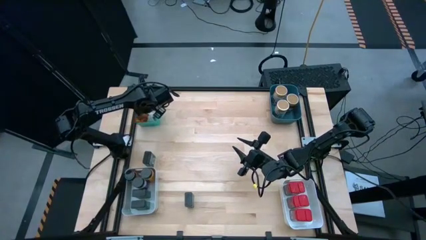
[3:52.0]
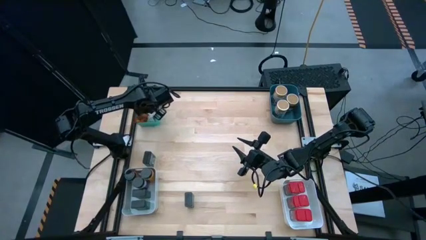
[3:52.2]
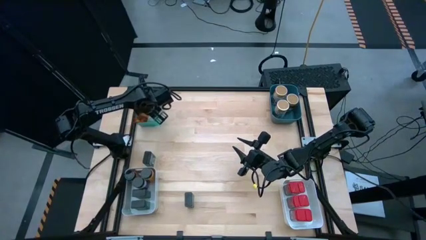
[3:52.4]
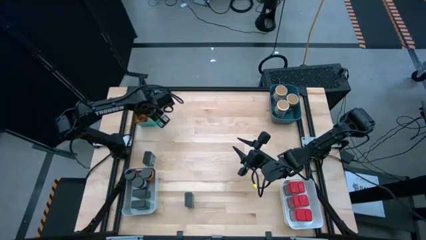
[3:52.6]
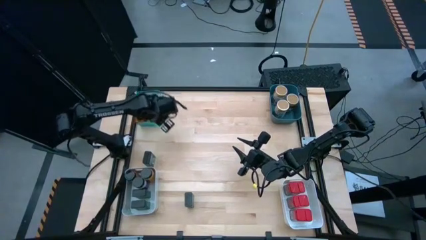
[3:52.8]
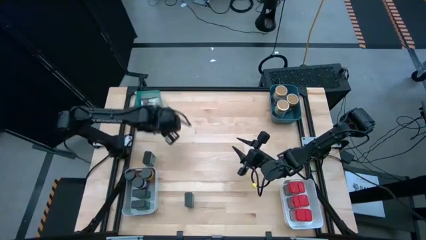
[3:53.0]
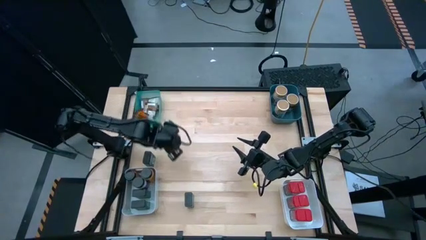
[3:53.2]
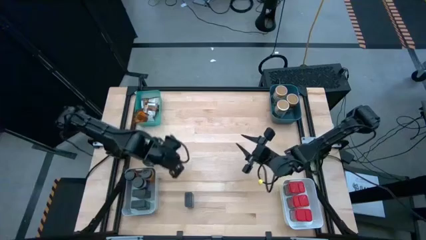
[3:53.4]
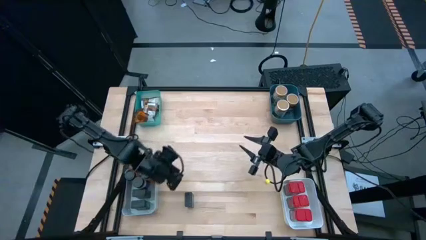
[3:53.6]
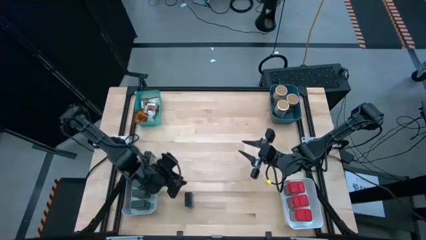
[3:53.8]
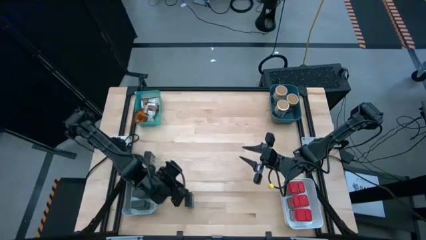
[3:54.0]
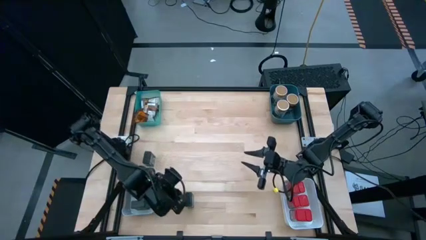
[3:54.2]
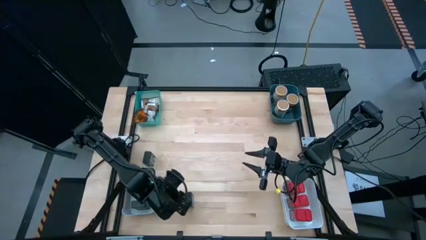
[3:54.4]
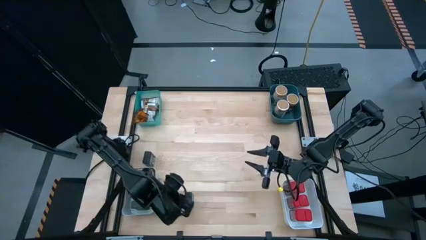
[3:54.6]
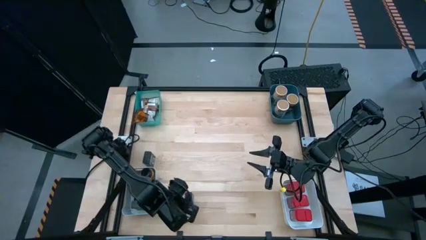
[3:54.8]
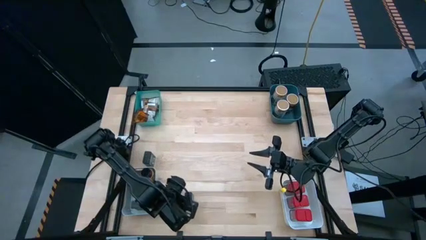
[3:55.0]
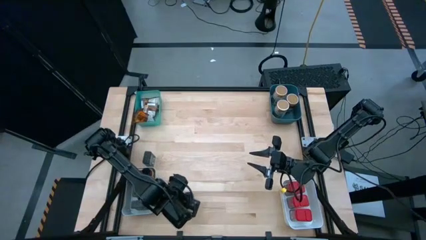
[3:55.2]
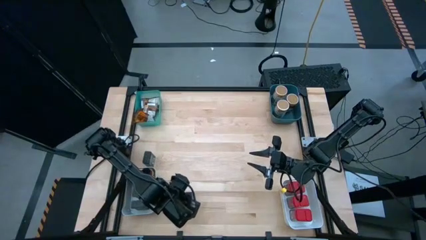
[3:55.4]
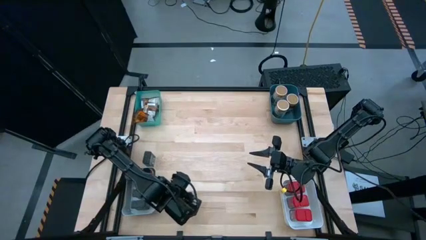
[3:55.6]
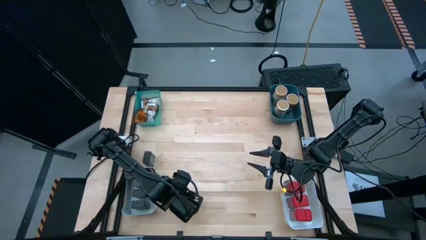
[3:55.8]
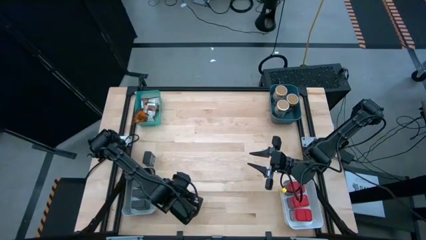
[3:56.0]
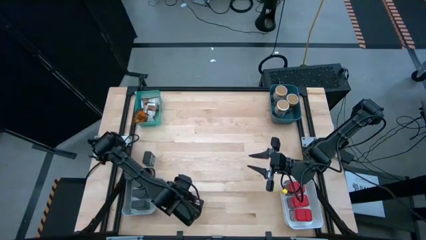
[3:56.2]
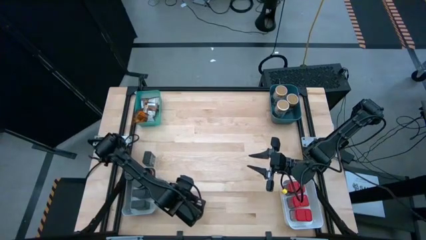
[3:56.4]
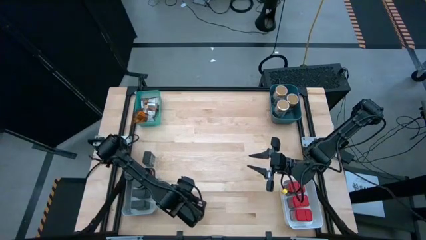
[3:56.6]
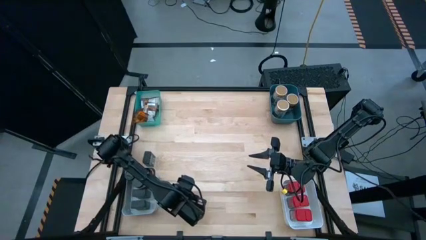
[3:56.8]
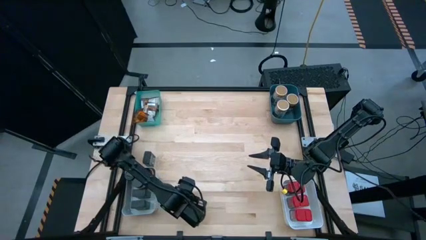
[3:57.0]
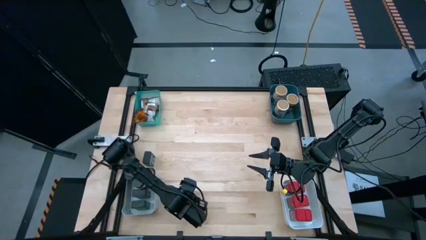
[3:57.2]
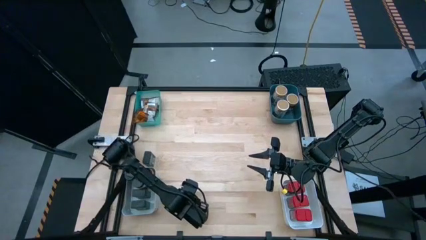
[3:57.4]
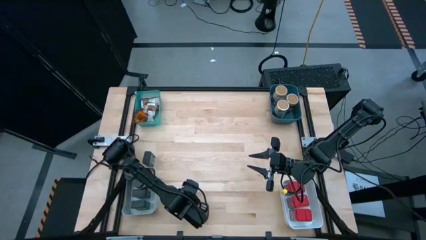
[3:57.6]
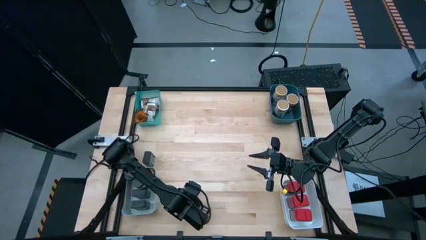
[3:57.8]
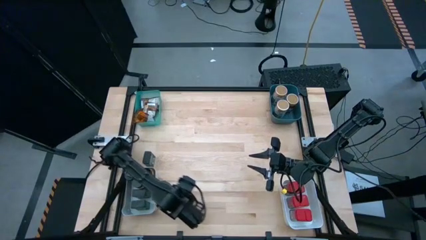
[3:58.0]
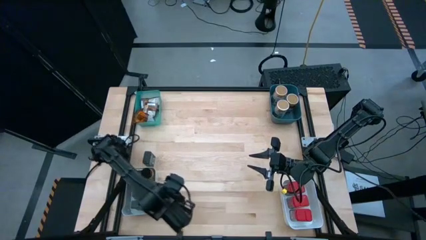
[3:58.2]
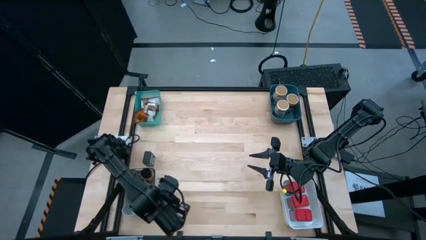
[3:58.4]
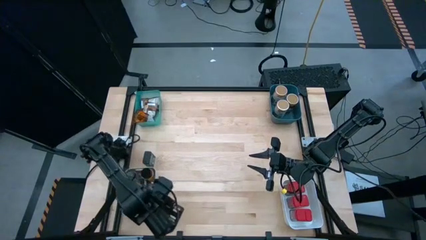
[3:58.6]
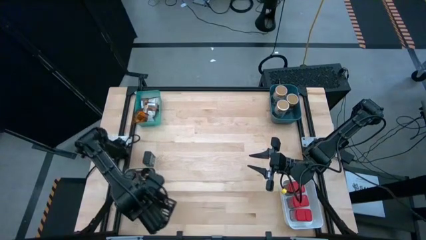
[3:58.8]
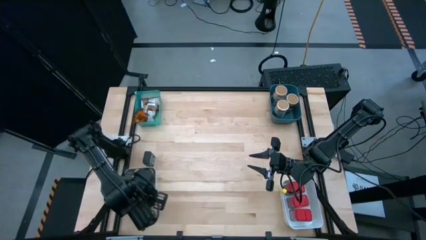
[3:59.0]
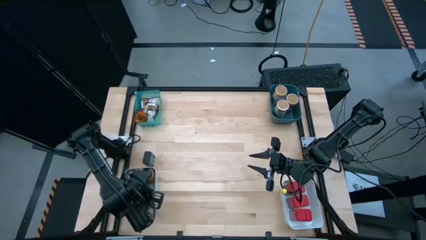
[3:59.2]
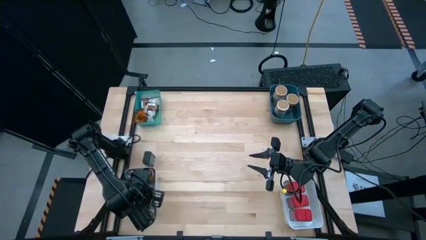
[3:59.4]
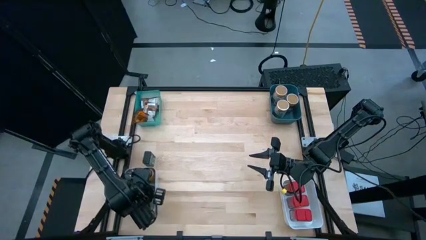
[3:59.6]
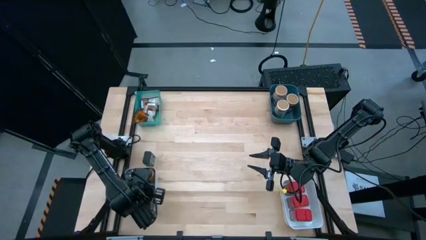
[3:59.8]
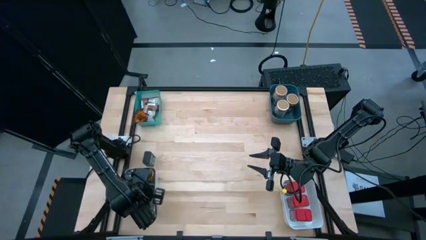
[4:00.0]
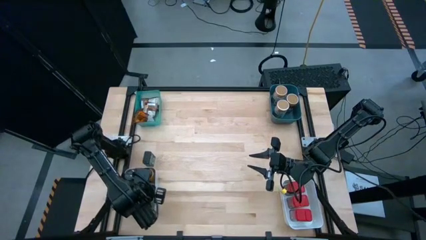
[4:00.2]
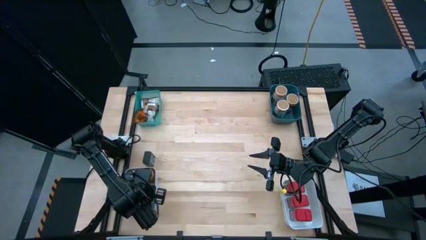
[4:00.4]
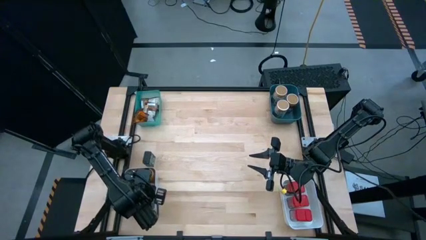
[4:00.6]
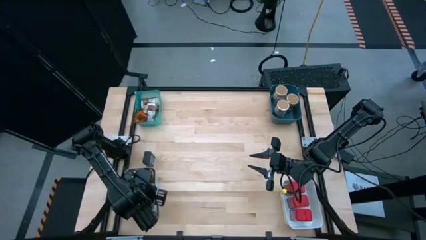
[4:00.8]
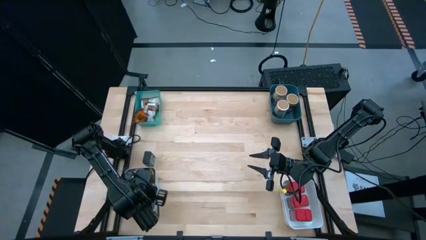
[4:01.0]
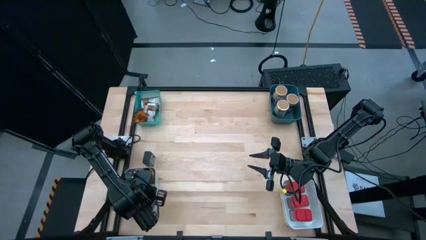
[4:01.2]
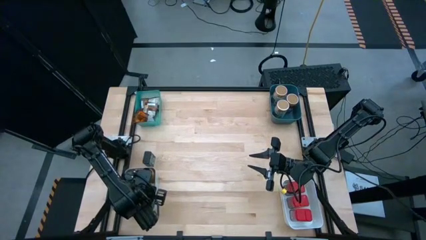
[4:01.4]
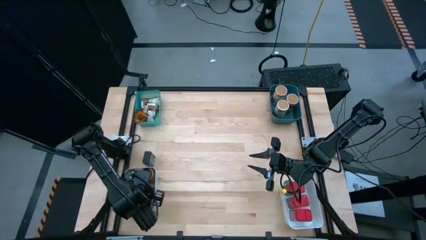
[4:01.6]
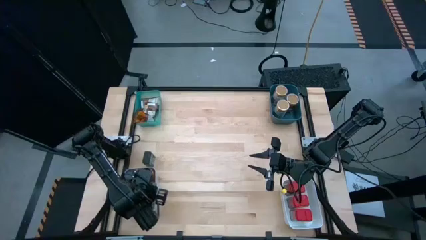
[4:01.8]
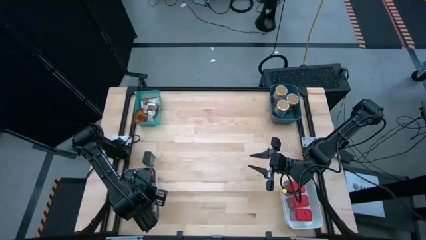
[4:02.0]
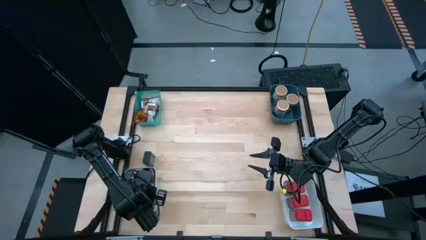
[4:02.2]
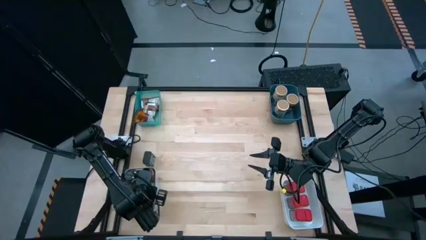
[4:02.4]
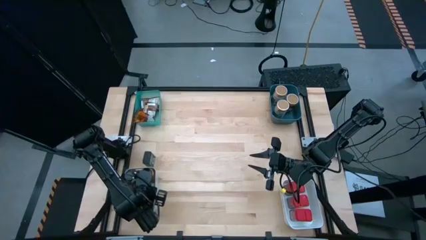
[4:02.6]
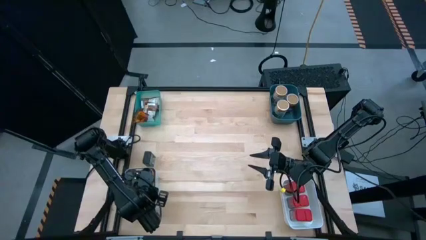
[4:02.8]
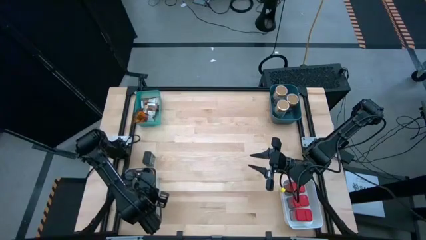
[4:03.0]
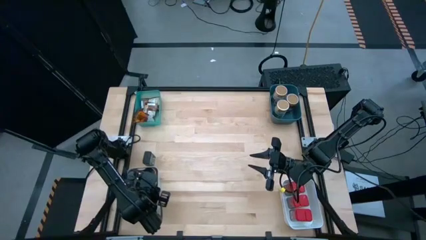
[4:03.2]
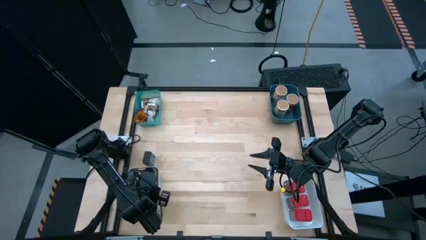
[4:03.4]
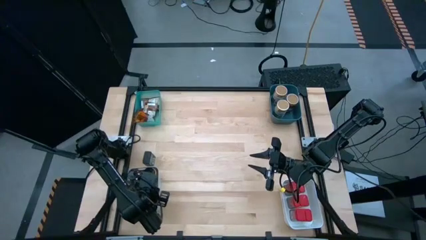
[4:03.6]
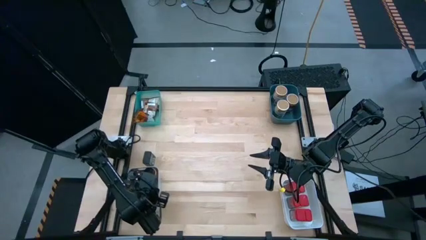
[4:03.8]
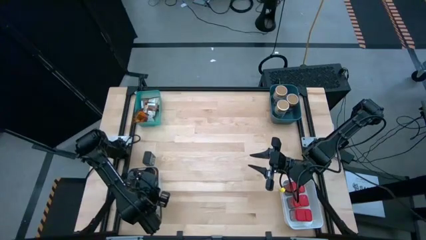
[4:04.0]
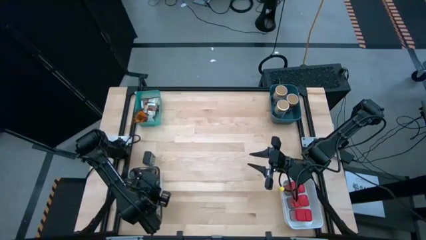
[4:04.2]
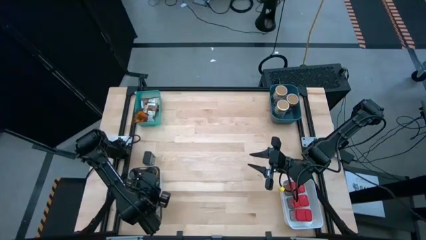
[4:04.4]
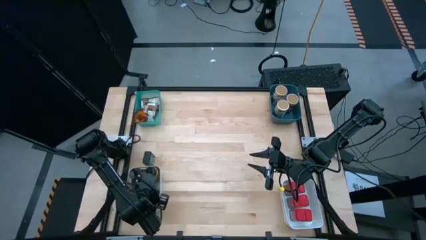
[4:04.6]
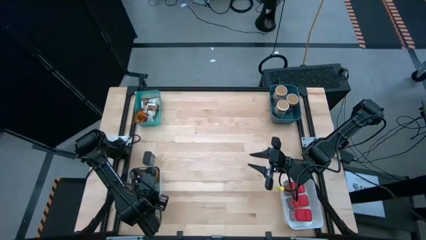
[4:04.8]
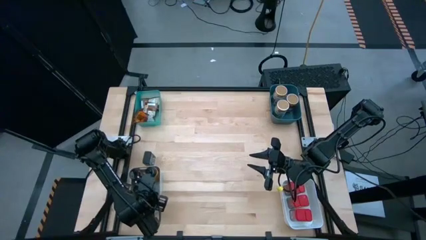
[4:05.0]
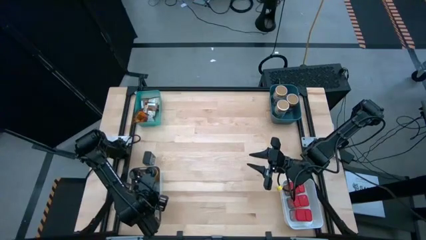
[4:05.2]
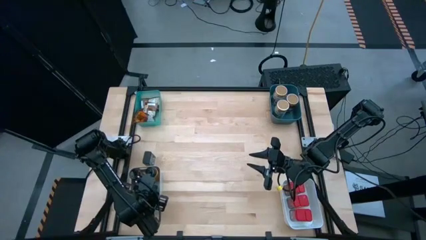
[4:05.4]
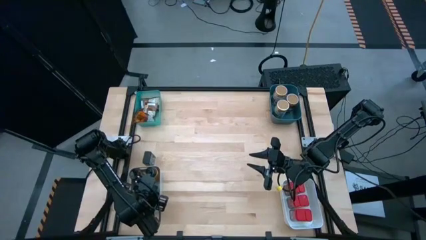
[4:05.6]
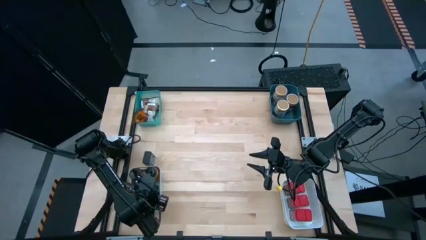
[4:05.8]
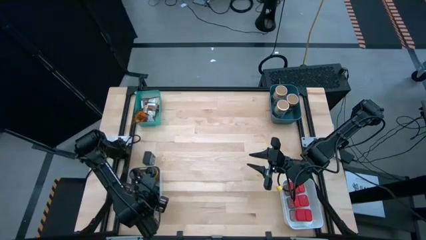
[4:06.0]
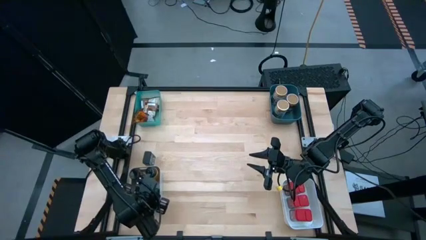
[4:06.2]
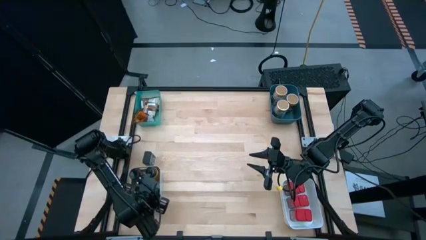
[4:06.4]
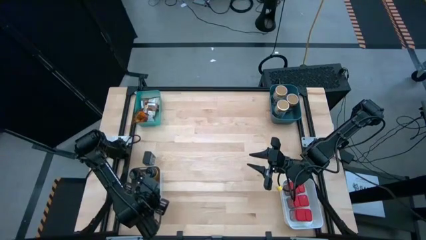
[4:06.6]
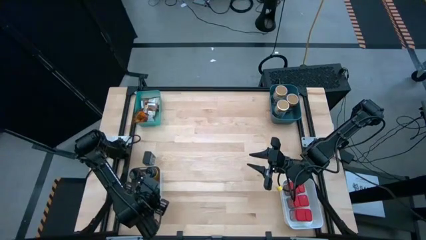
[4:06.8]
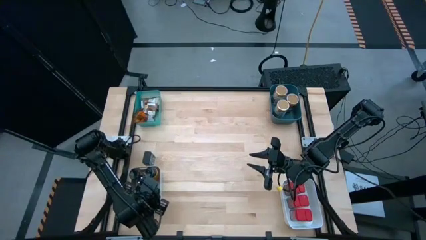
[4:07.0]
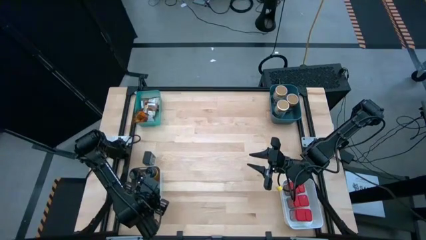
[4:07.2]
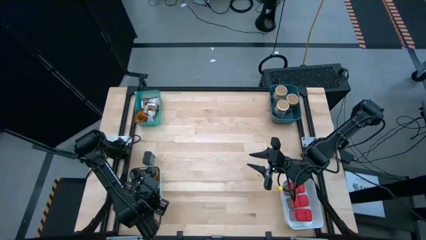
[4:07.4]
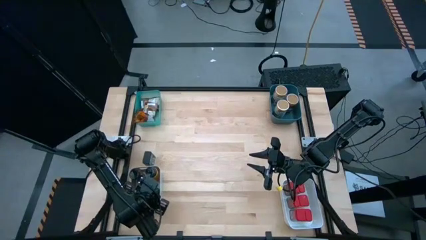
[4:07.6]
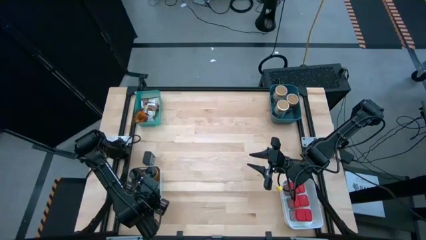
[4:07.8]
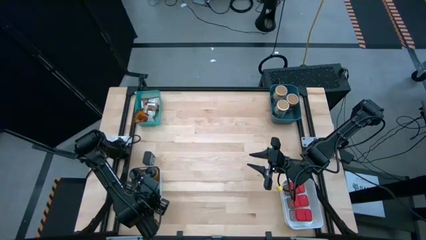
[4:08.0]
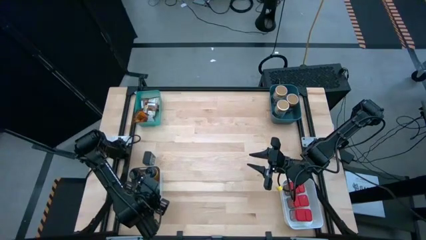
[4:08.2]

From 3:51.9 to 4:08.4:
Task: Sort spices by type
Put the bottom black seasoning can into the gray bin
